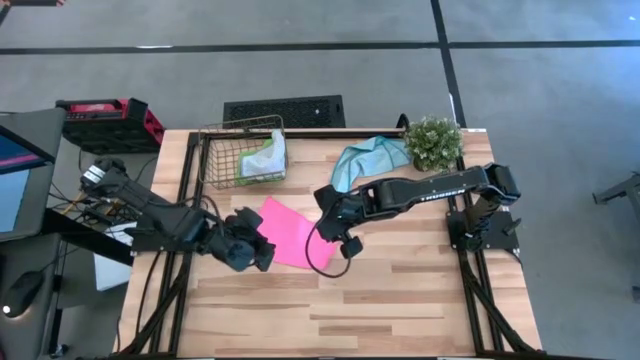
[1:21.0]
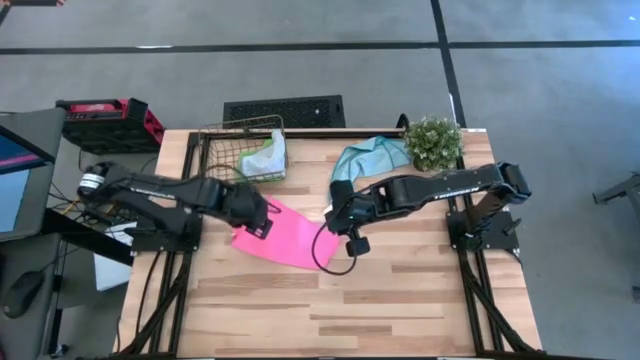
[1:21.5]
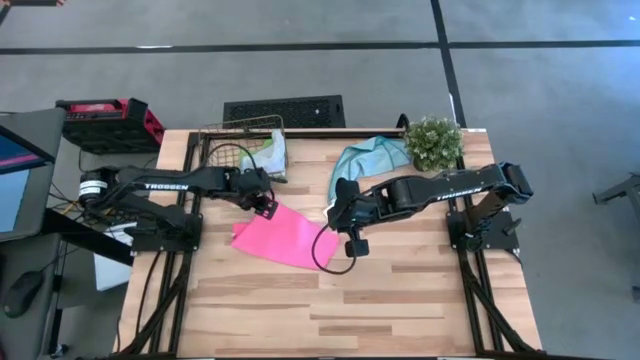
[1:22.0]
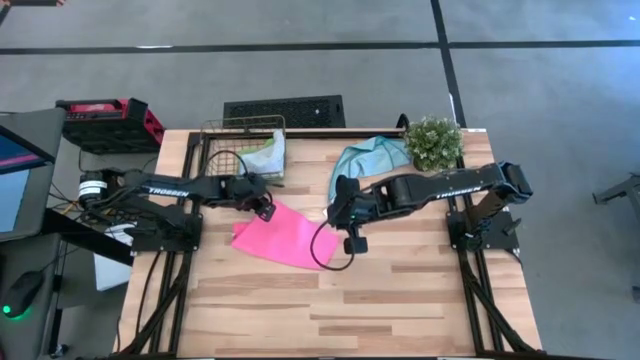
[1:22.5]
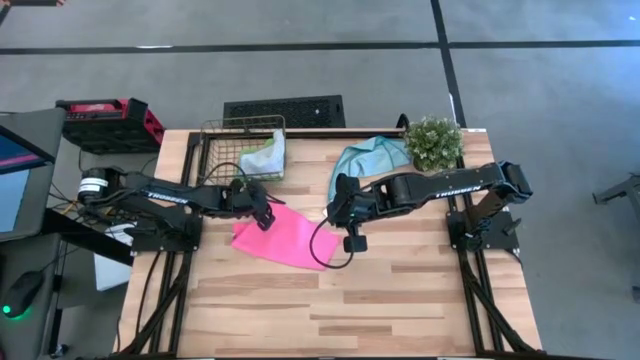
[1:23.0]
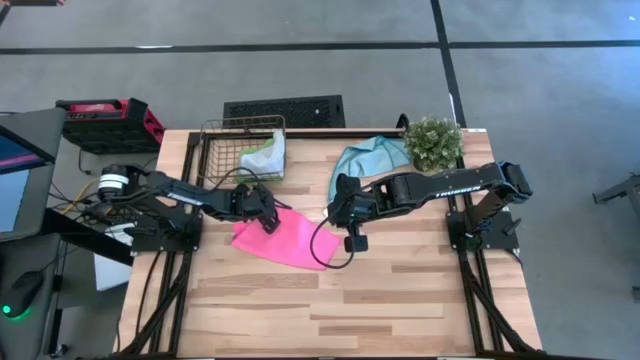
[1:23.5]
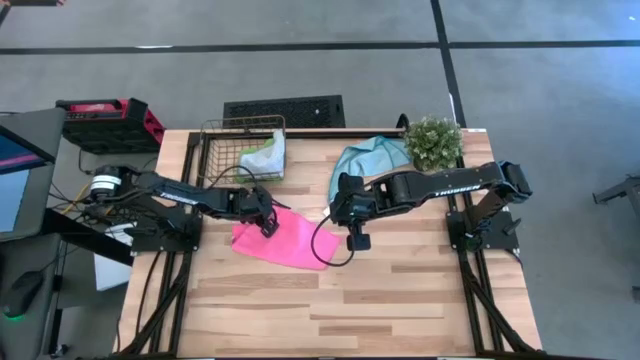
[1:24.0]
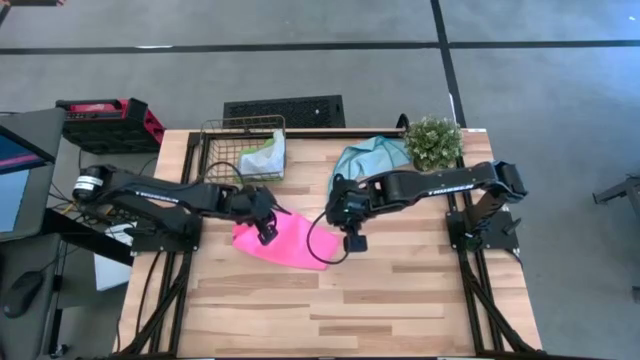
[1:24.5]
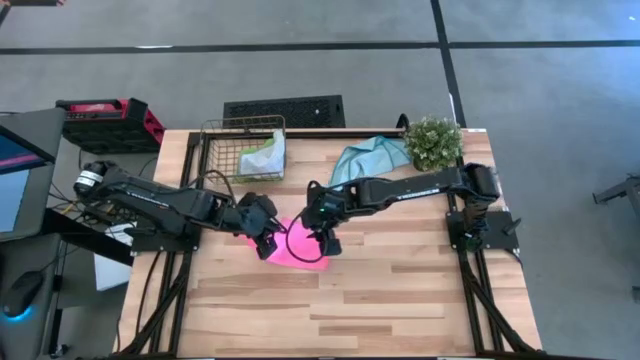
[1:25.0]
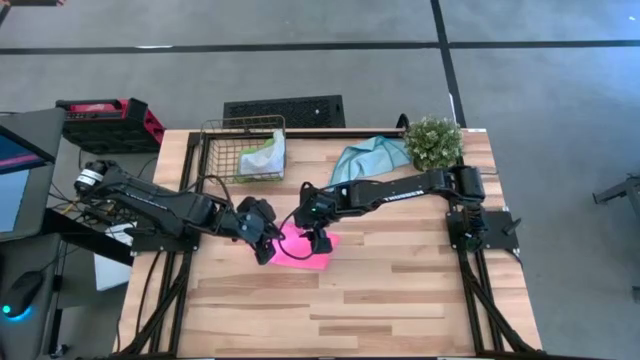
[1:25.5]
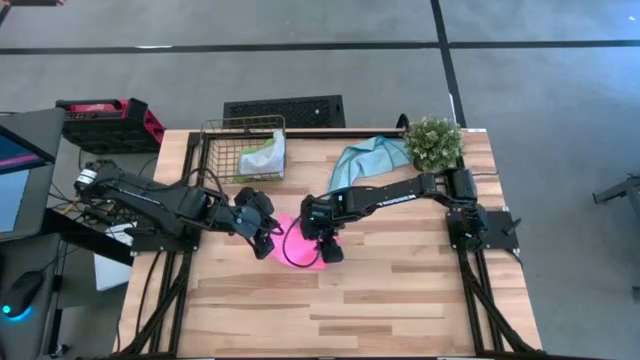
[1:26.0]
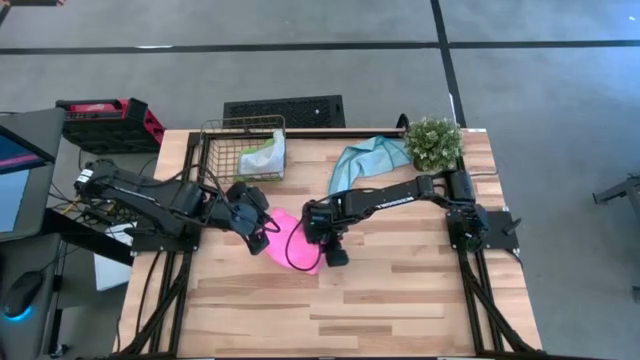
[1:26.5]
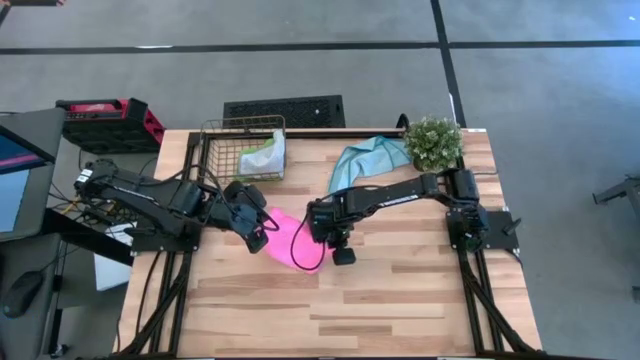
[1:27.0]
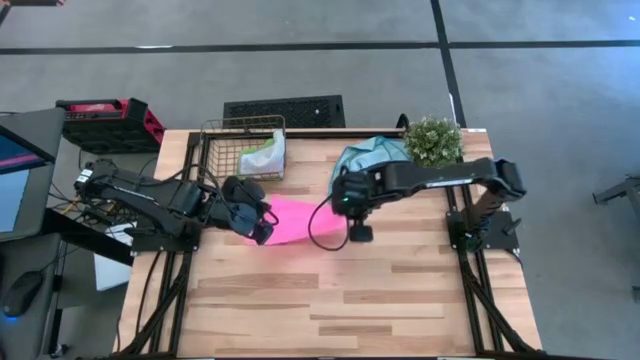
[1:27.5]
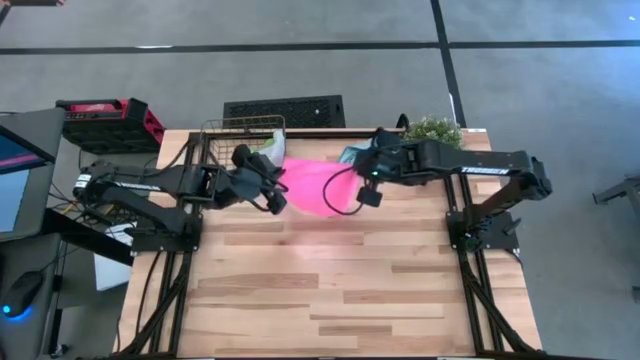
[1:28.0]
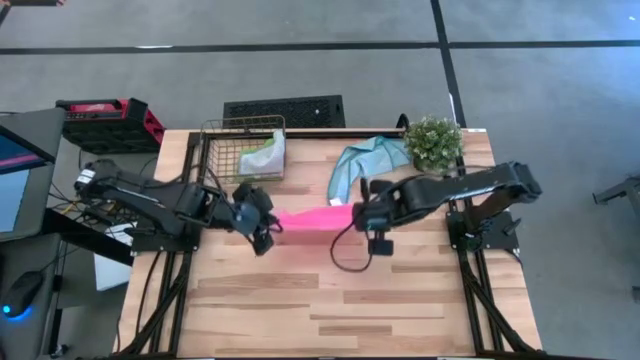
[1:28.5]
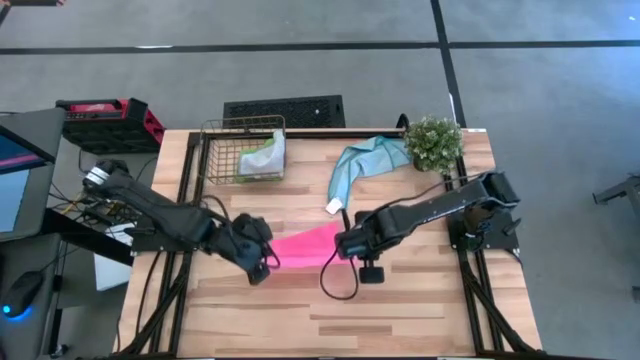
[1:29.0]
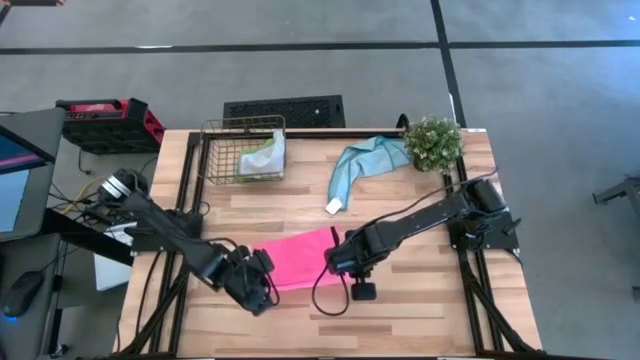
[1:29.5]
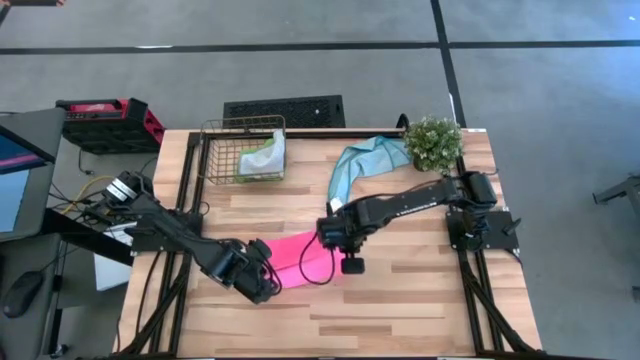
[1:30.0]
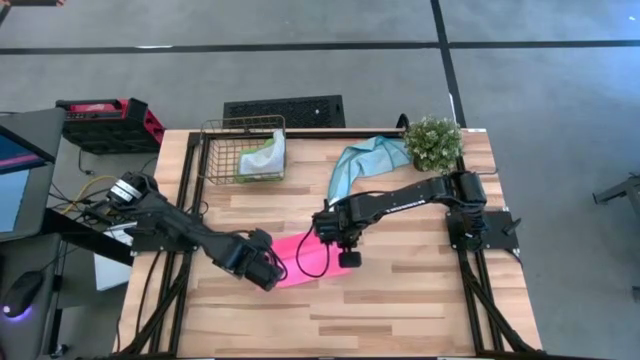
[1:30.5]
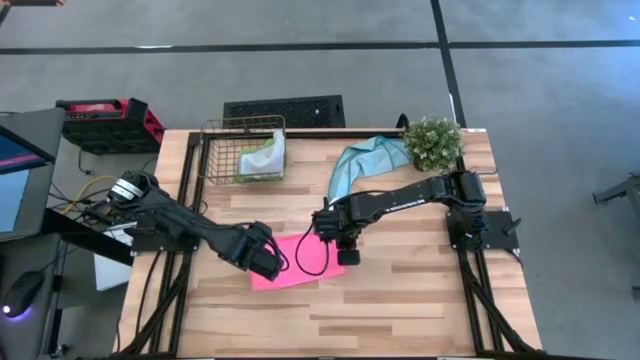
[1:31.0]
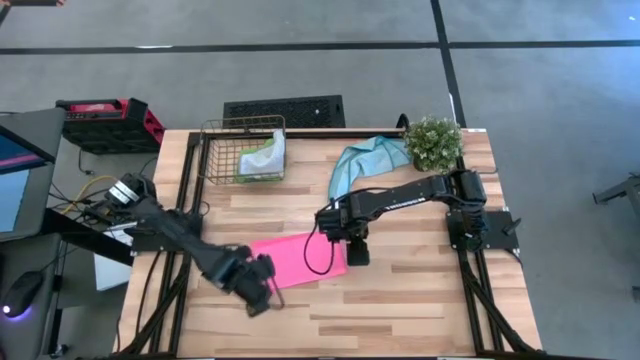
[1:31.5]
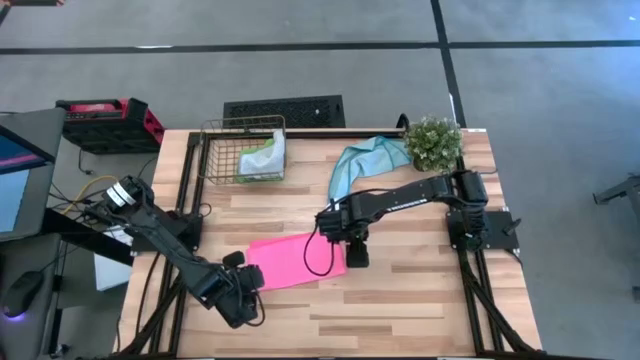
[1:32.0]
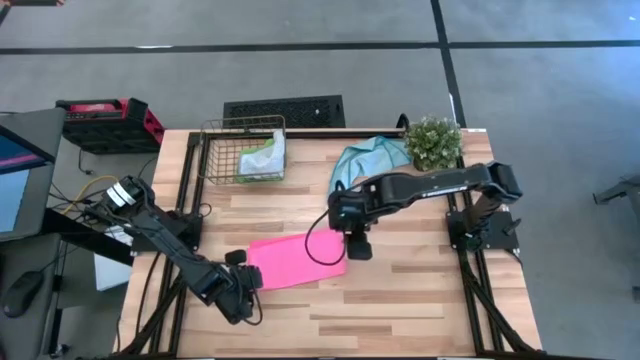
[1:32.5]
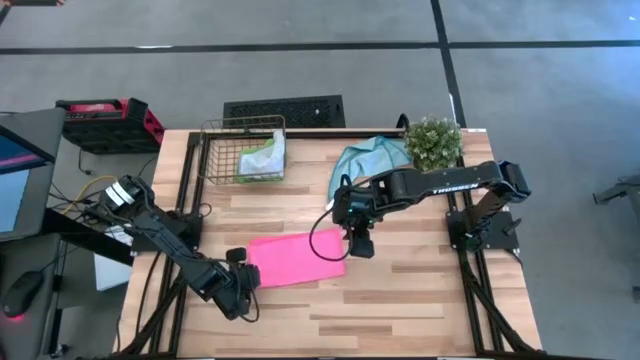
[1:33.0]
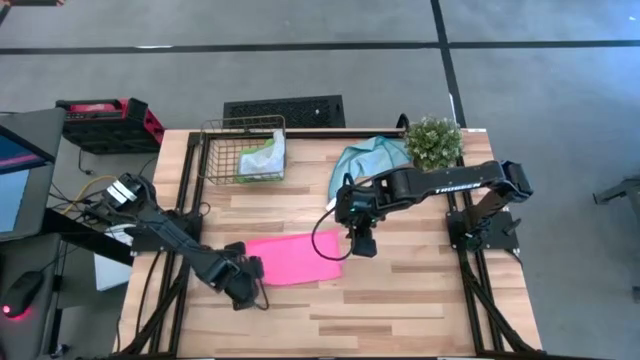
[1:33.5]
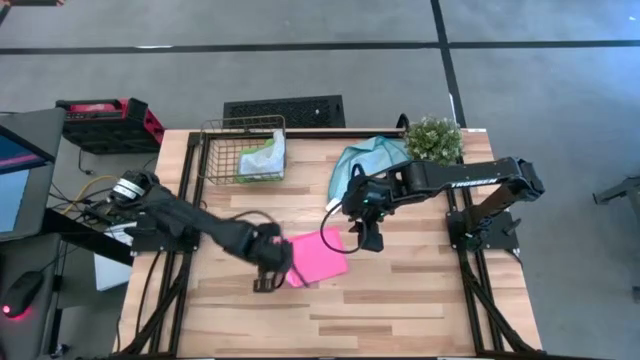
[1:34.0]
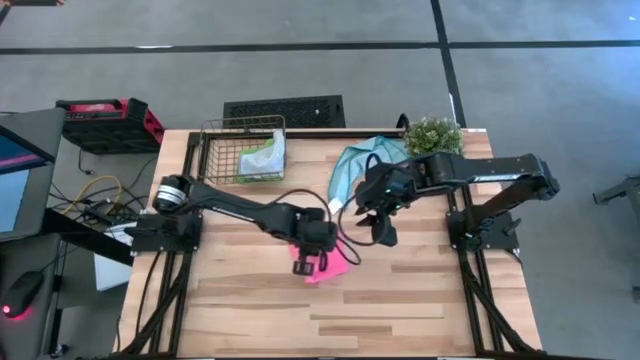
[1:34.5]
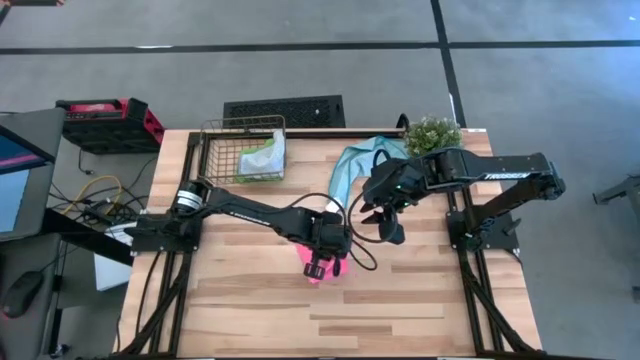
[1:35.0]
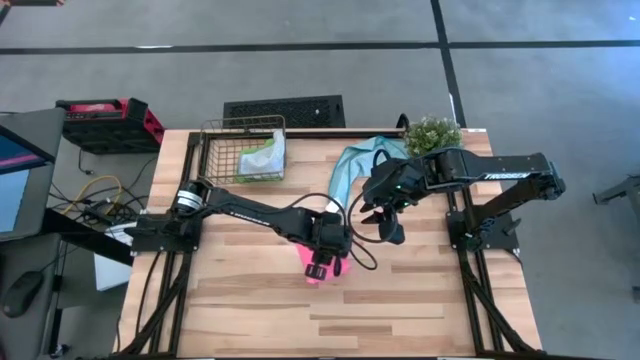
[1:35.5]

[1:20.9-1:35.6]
Task: Fold microfiber towels
Fold the pink microfiber cloth

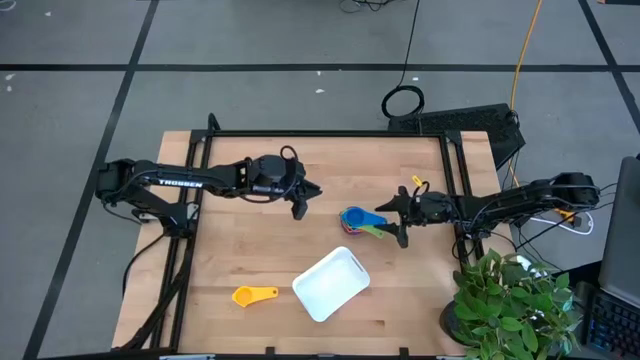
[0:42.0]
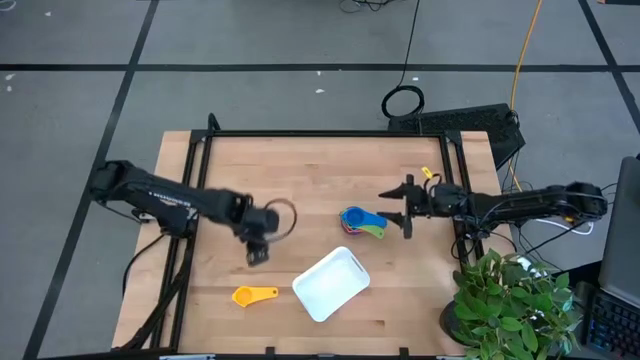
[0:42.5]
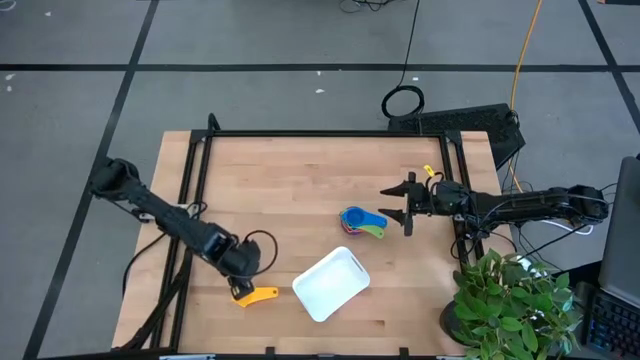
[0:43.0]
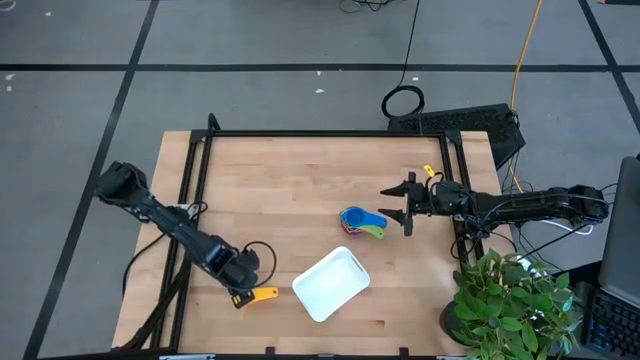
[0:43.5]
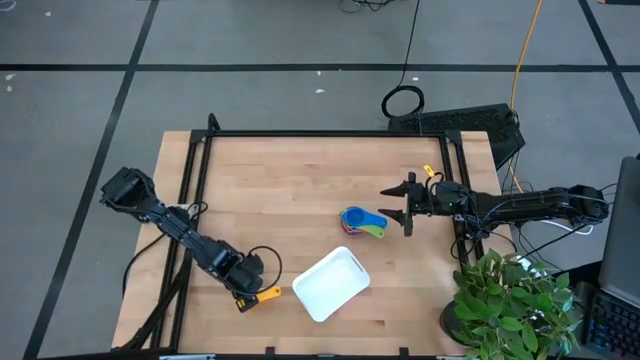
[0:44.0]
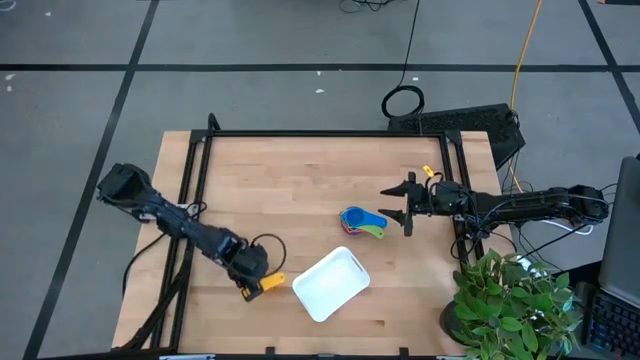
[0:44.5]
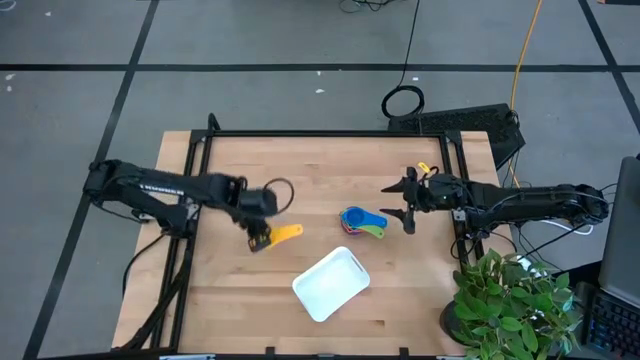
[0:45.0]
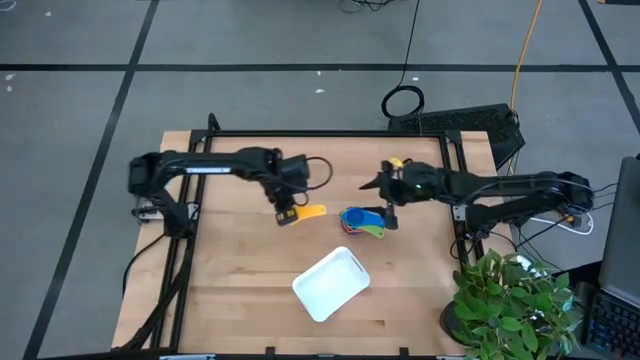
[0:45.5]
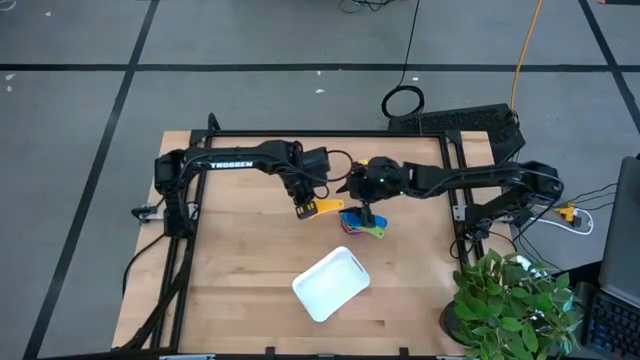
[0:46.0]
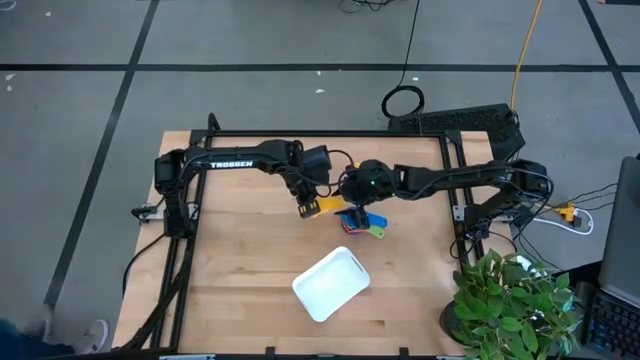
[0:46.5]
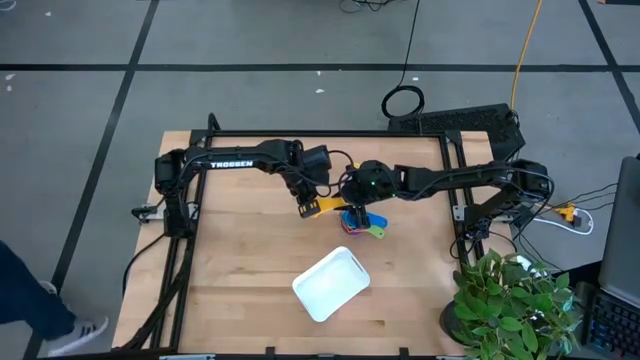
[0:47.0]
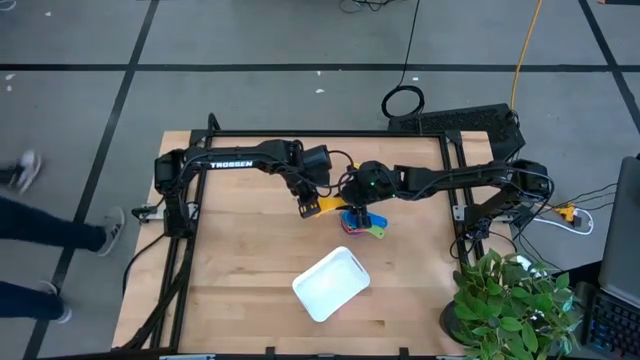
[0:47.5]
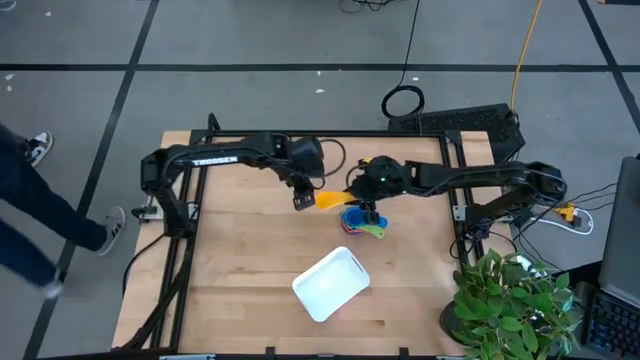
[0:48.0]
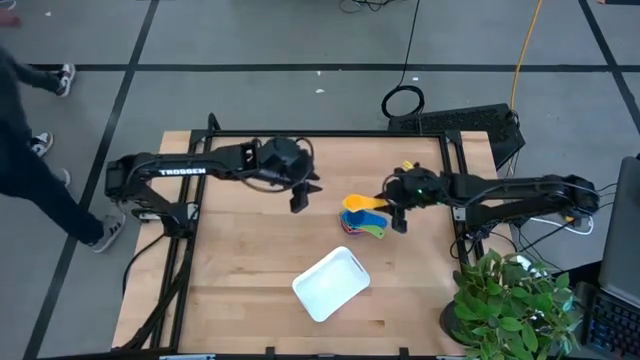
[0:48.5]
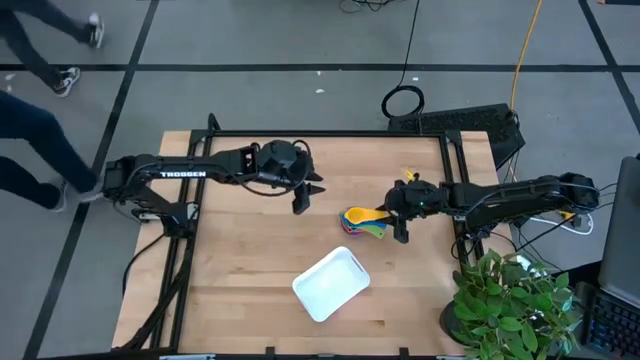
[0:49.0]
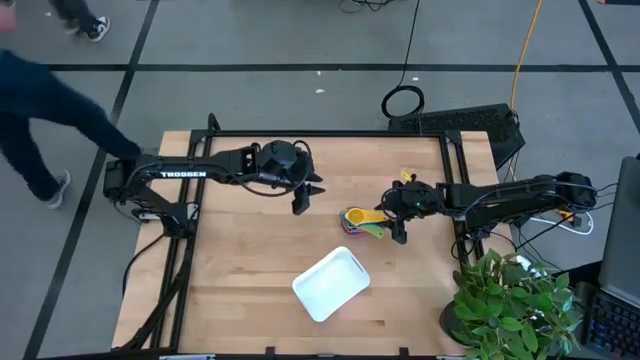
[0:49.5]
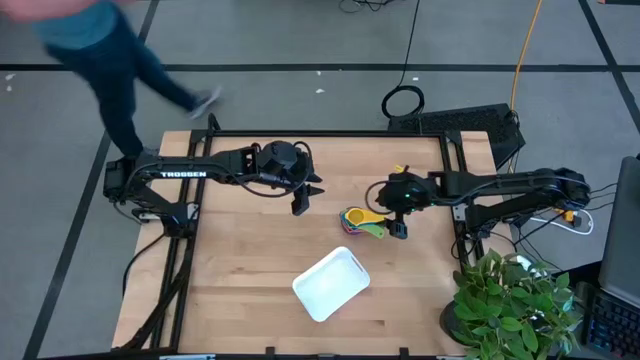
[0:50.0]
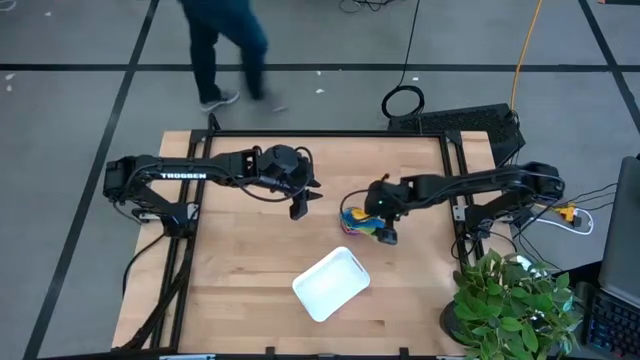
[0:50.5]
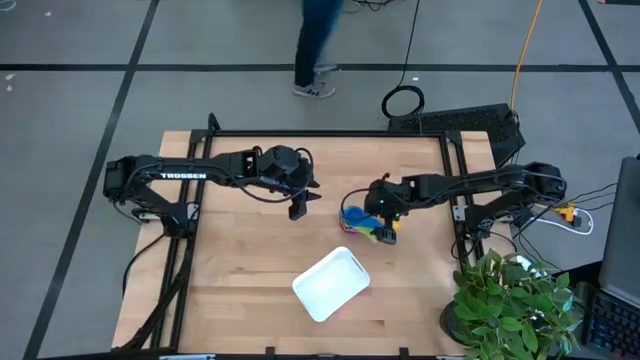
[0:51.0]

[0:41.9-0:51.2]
Task: Nest measuring cups in basket
Stack the yellow measuring cup on top of the blue measuring cup
